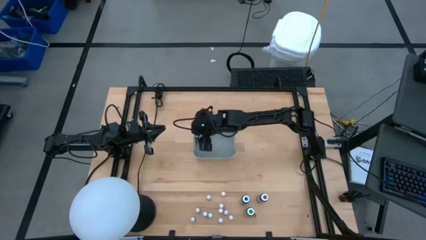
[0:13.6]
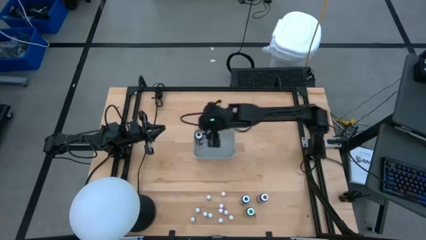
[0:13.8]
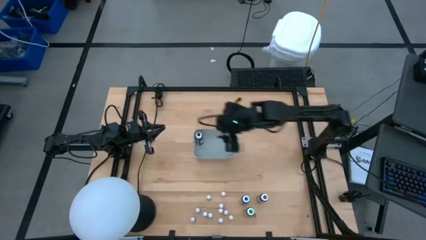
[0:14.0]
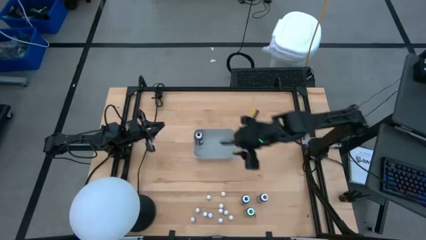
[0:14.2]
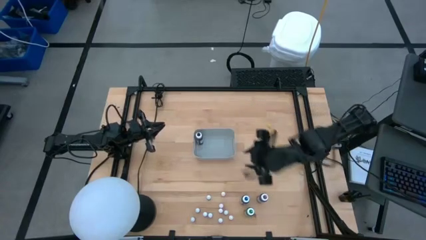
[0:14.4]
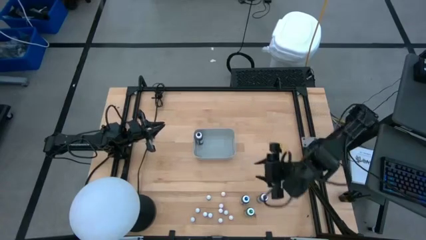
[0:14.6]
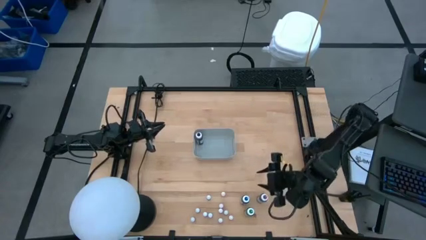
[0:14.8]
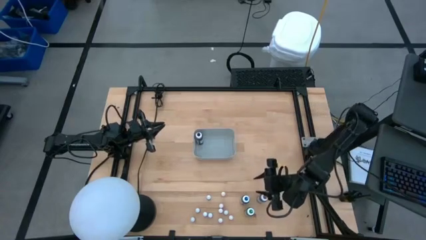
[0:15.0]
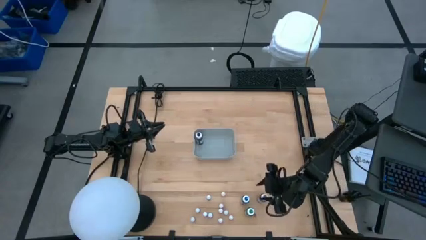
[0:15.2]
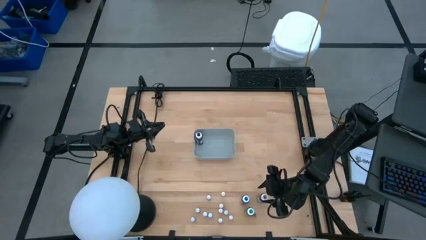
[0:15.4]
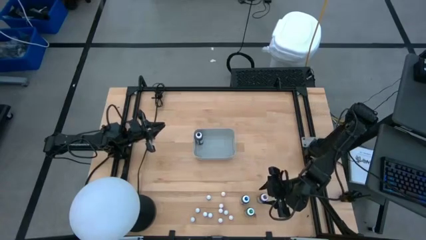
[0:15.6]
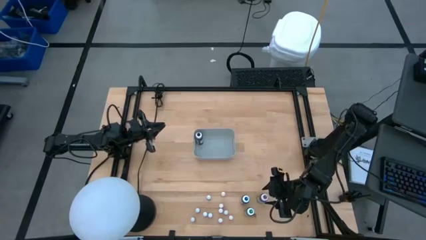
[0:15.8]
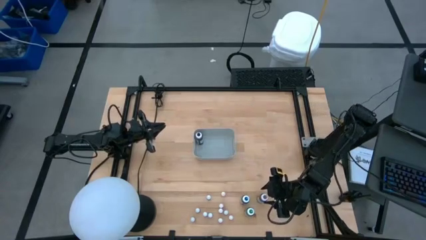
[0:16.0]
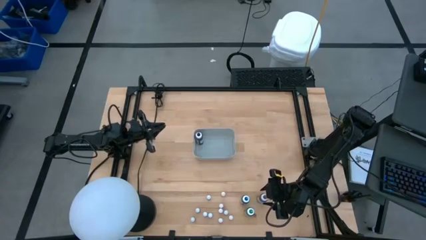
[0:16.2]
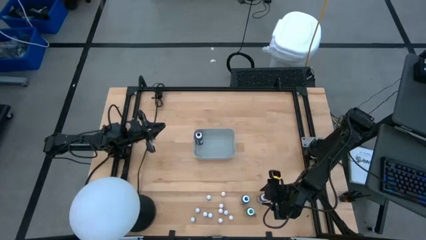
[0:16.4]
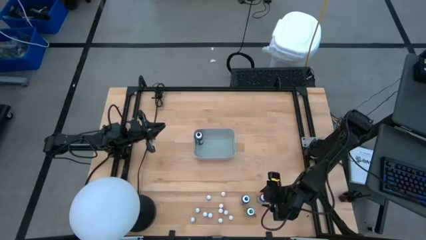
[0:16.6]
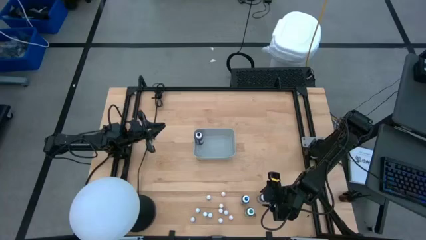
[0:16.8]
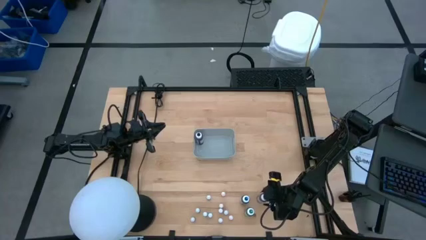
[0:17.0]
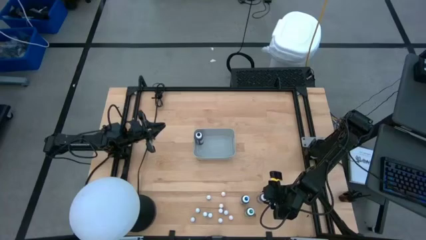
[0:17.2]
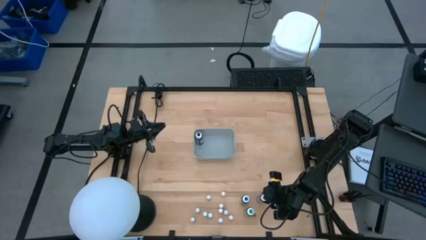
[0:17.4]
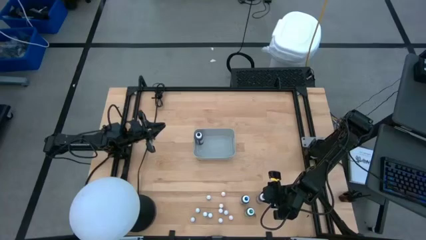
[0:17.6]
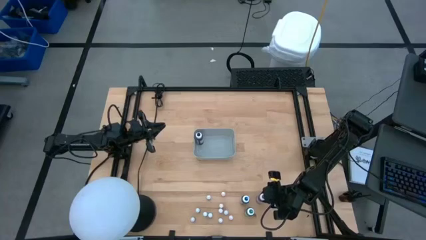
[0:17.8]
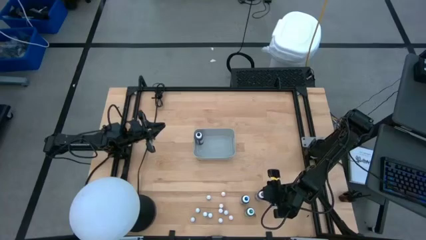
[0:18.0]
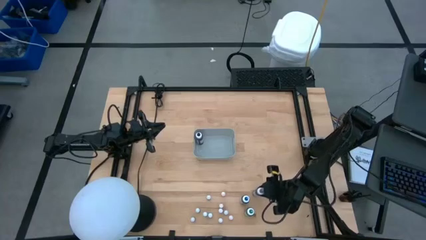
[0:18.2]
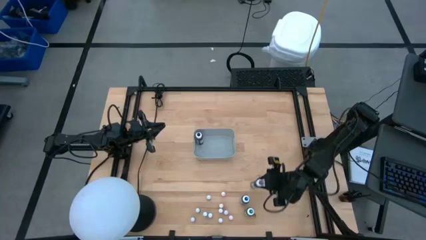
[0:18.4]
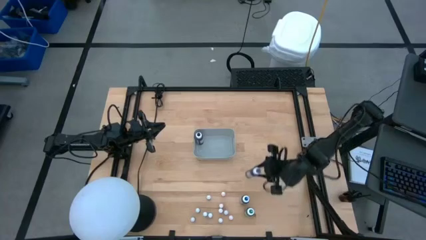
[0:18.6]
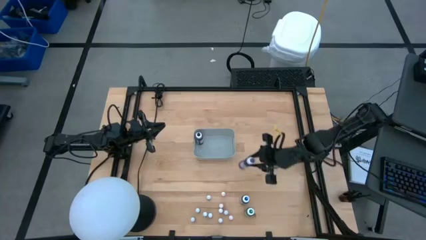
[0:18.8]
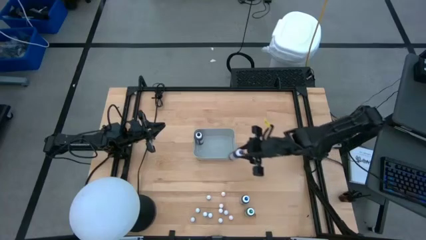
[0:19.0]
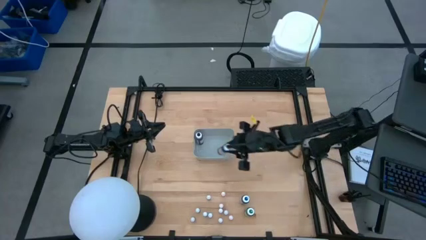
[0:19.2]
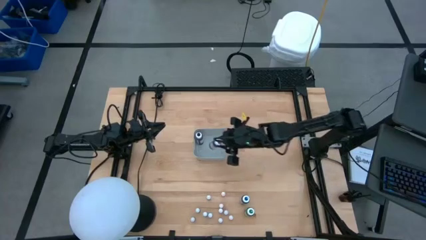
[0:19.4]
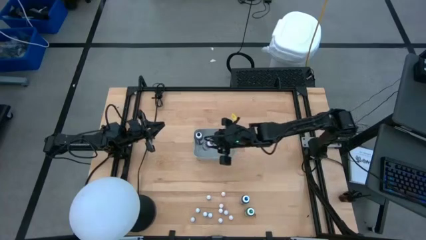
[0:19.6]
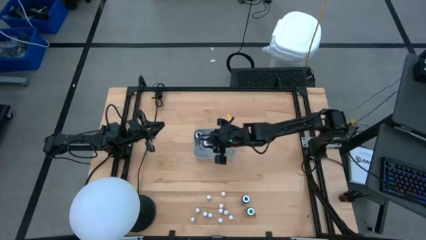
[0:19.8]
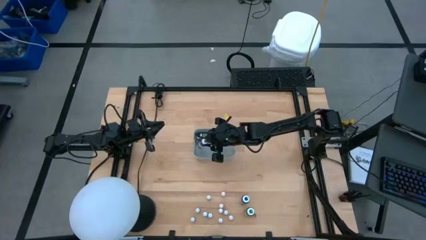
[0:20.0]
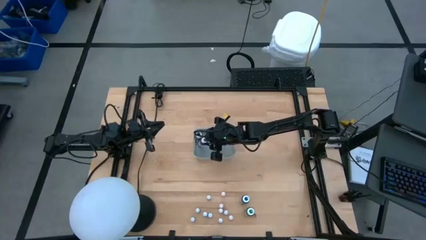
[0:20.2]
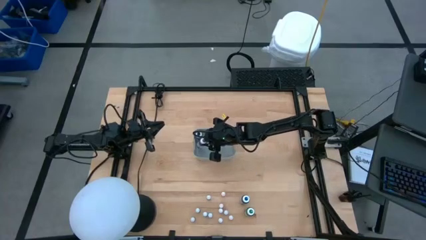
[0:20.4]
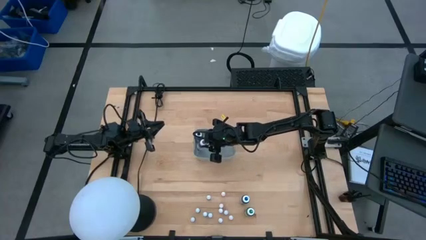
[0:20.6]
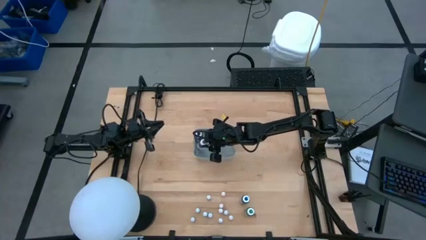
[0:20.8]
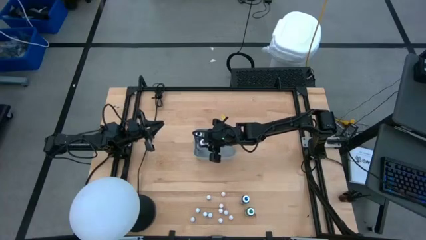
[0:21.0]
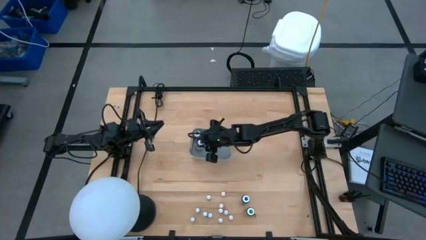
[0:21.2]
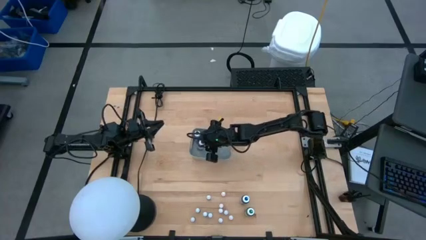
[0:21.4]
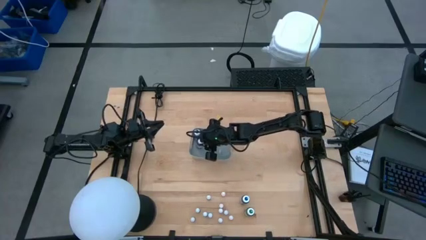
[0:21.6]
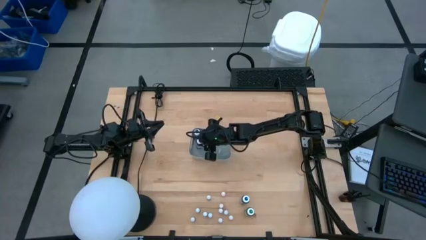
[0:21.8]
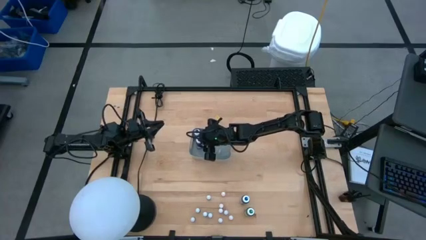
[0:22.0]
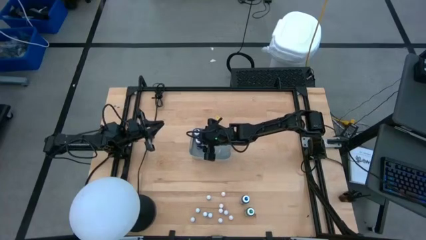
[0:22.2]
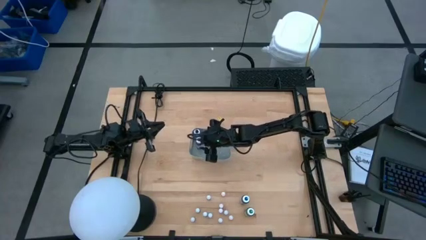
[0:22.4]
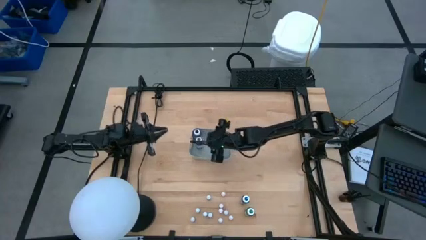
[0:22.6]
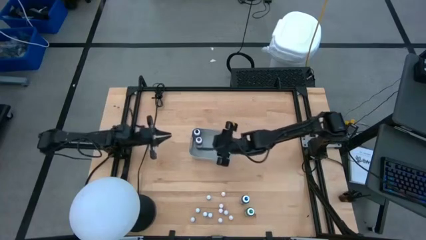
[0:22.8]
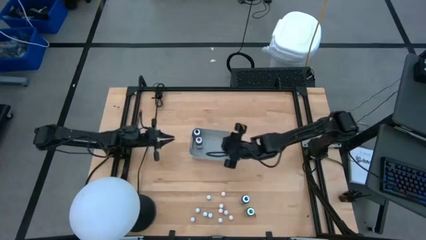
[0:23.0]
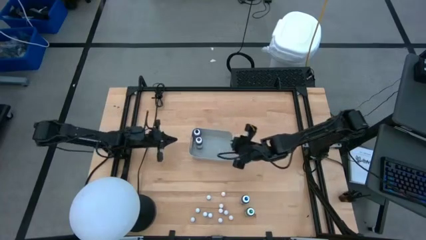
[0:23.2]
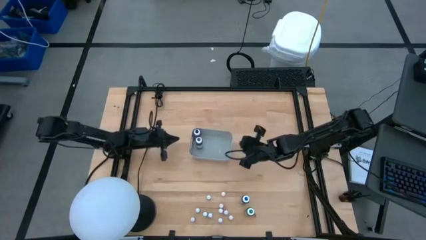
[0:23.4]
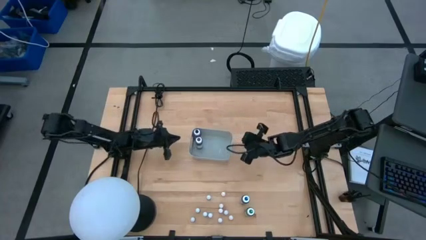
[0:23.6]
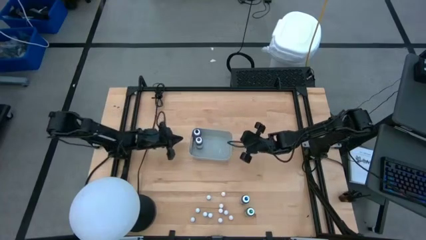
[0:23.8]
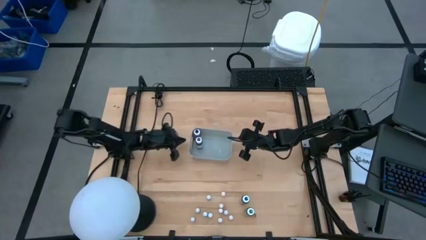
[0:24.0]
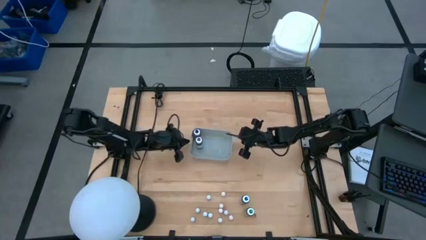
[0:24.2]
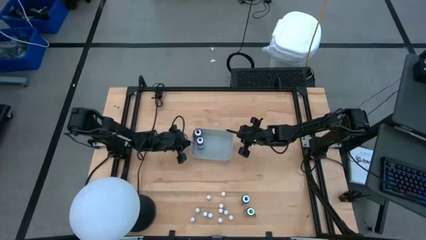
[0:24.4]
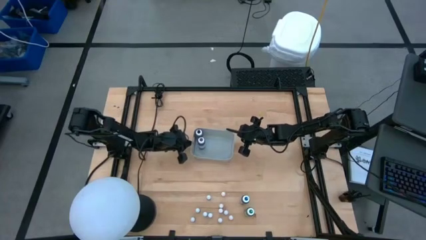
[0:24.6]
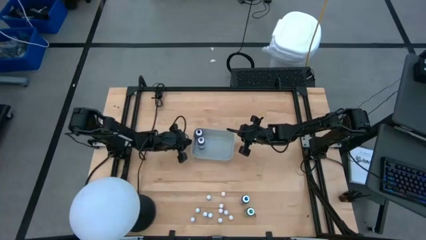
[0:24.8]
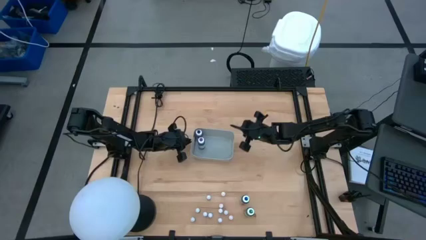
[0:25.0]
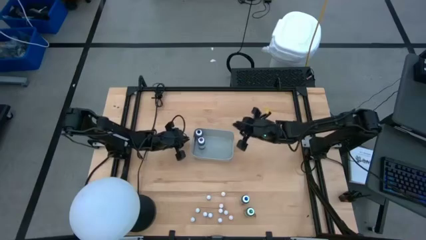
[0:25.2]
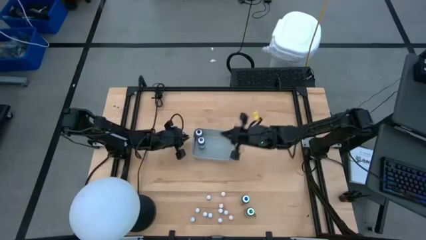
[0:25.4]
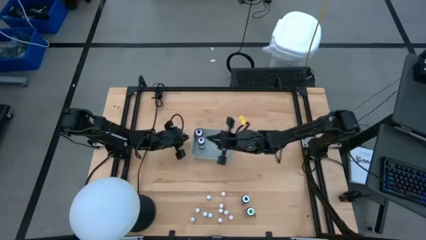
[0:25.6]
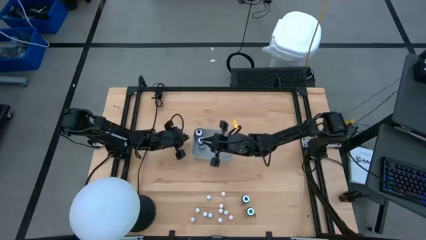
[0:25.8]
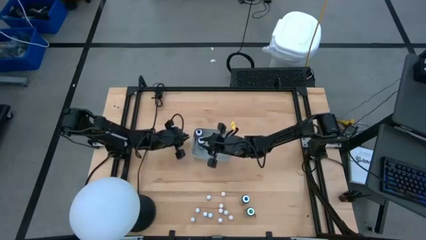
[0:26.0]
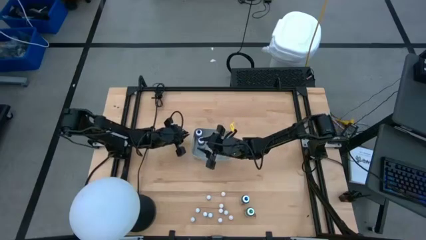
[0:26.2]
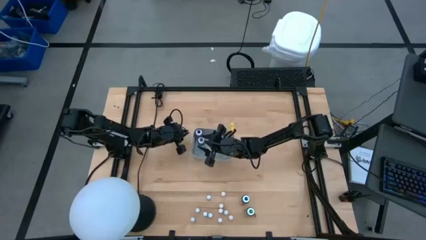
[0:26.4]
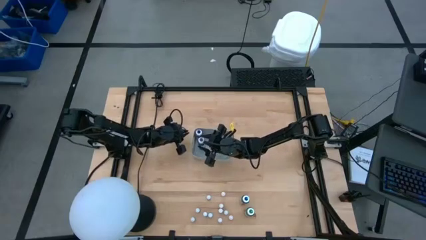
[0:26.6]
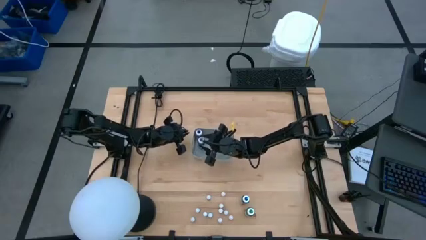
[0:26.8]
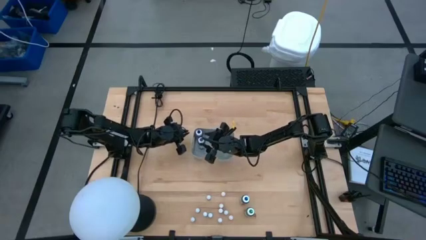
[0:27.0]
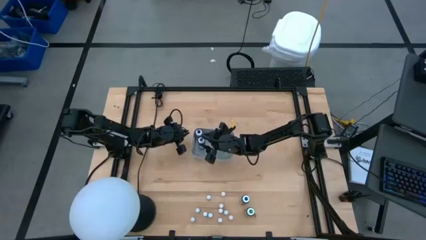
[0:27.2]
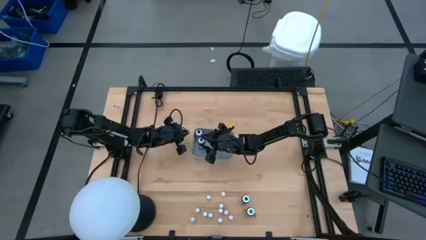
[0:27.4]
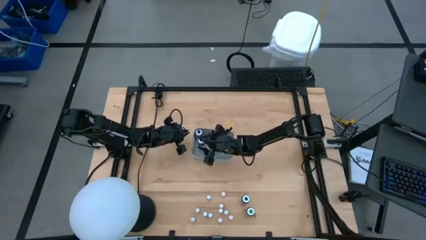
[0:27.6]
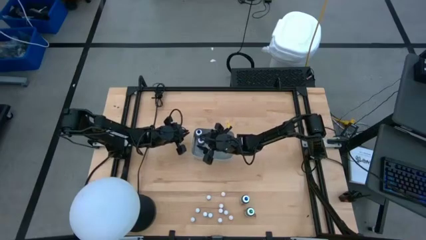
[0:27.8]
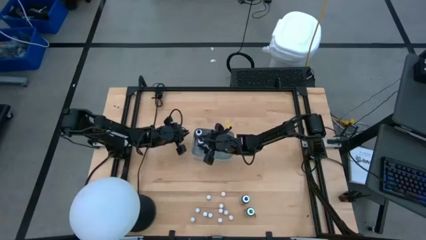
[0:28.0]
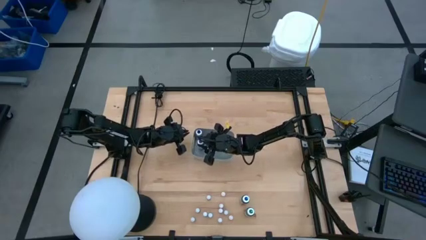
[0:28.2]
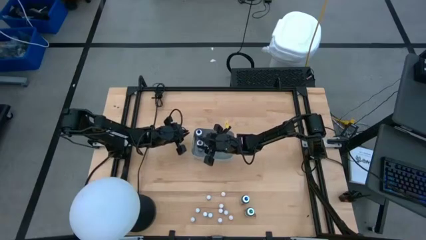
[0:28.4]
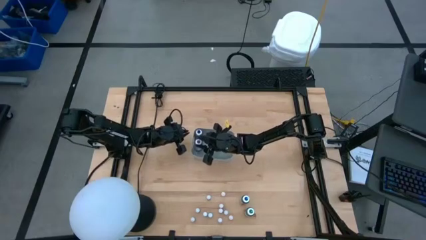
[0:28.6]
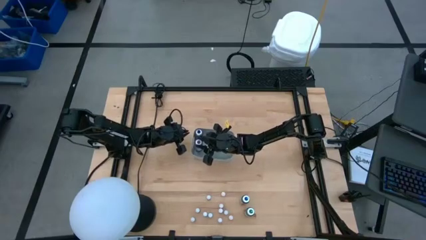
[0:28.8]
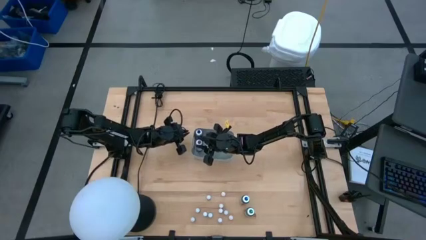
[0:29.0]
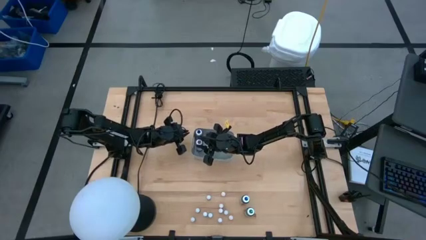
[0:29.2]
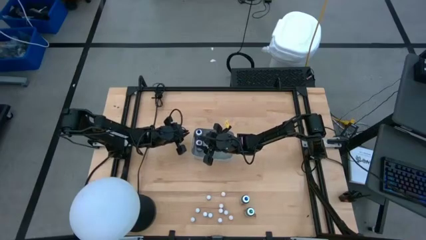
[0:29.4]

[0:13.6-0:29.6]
Task: Pick & Place food coloring
Put the large violet food coloring bottle into the gray bin
